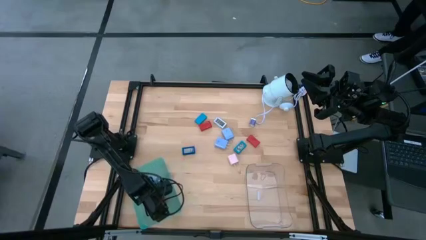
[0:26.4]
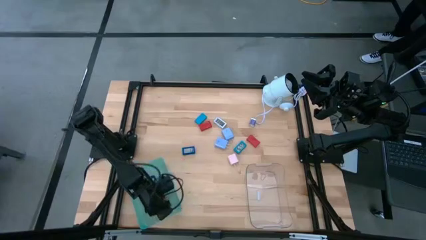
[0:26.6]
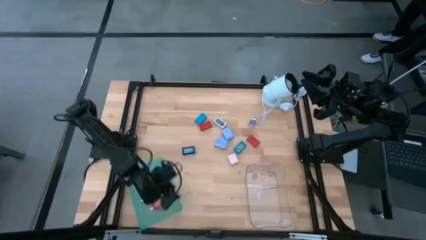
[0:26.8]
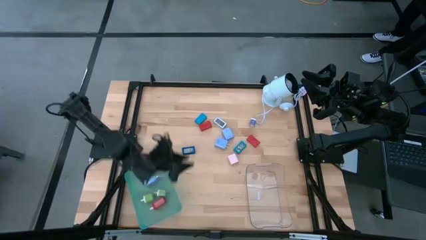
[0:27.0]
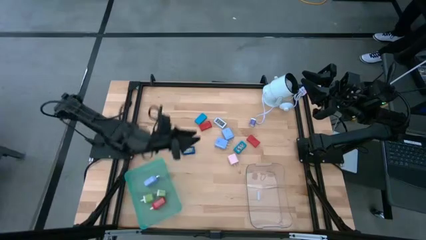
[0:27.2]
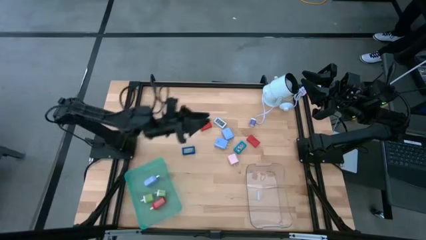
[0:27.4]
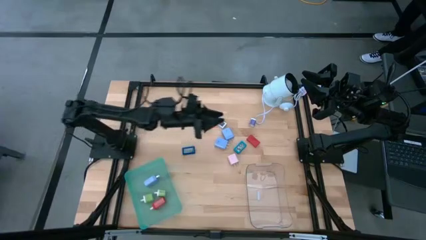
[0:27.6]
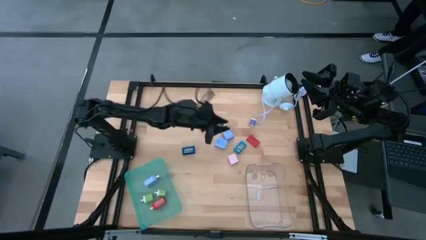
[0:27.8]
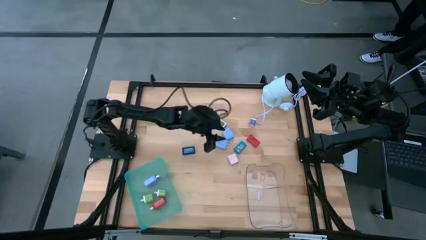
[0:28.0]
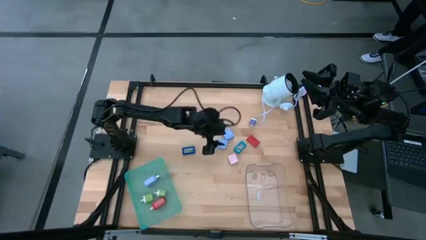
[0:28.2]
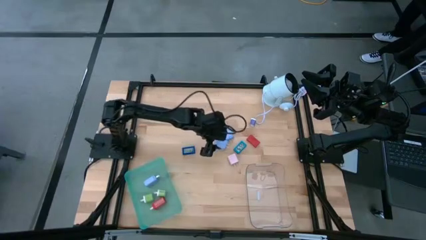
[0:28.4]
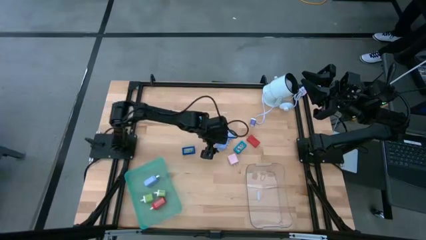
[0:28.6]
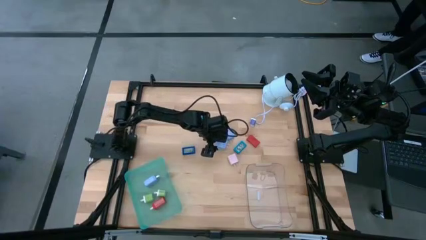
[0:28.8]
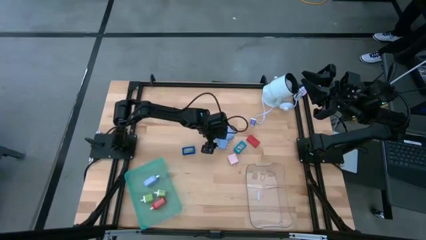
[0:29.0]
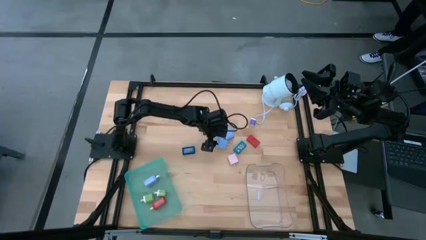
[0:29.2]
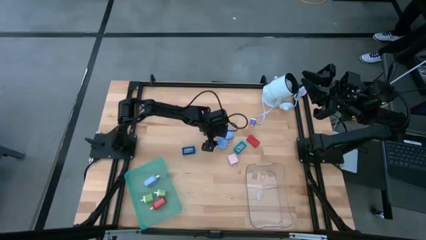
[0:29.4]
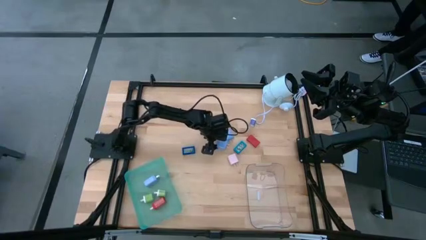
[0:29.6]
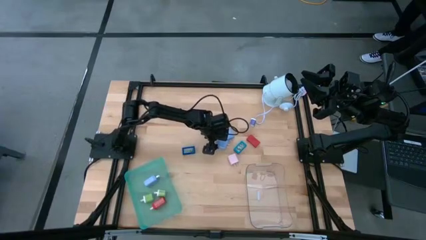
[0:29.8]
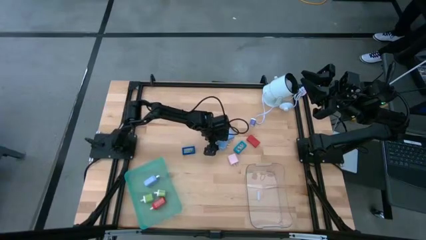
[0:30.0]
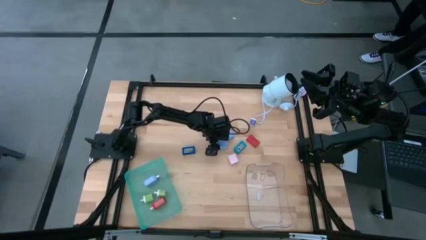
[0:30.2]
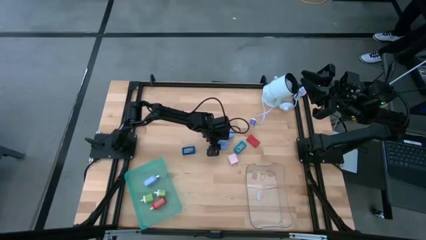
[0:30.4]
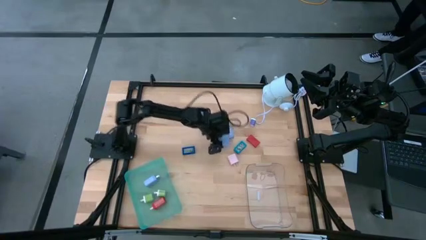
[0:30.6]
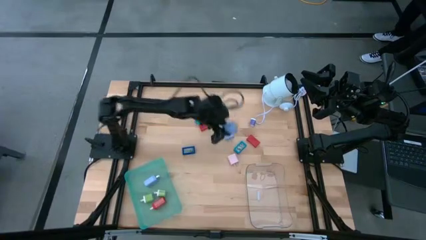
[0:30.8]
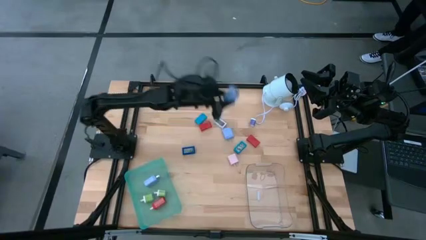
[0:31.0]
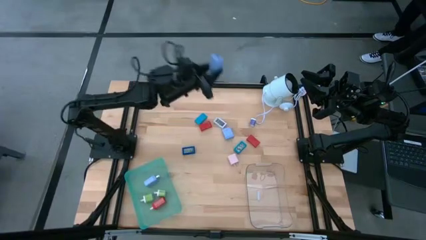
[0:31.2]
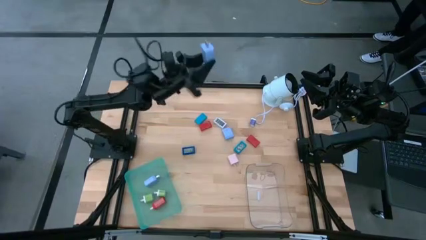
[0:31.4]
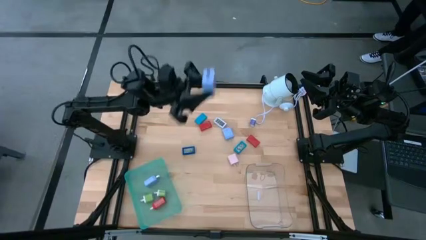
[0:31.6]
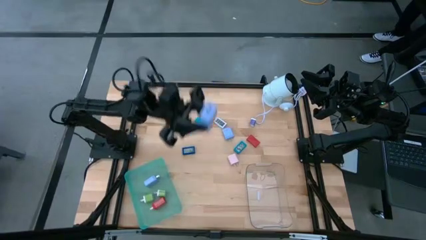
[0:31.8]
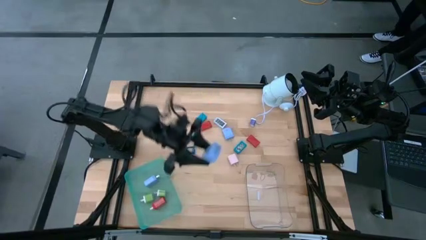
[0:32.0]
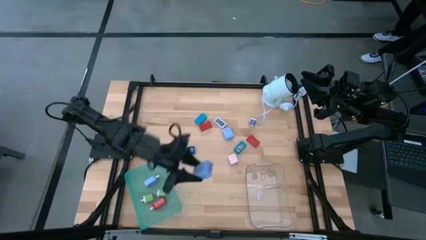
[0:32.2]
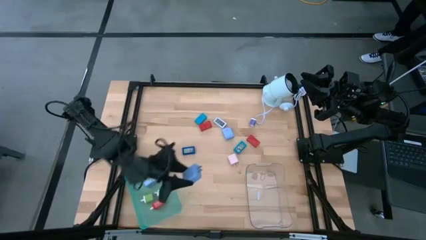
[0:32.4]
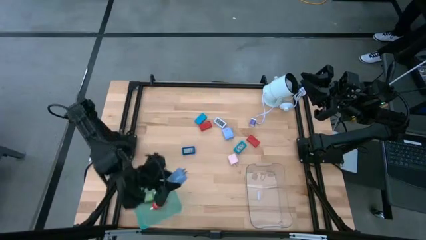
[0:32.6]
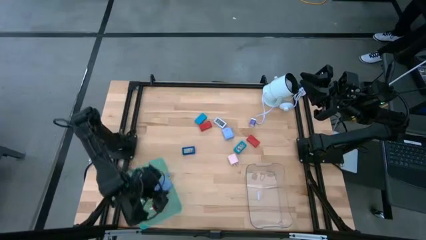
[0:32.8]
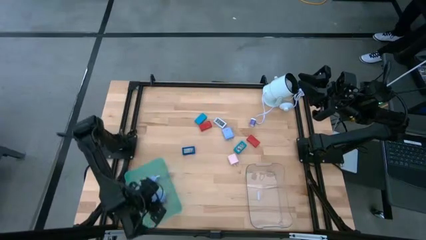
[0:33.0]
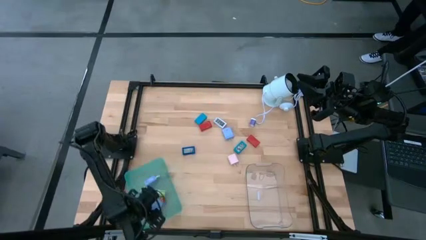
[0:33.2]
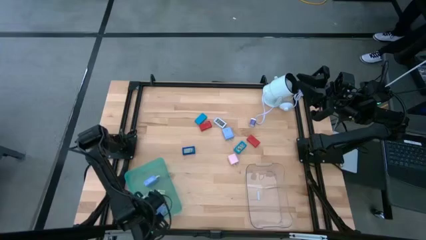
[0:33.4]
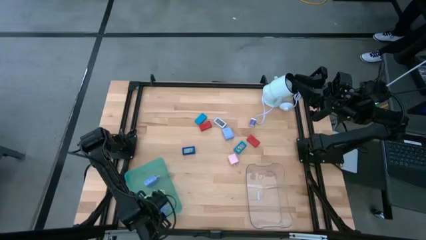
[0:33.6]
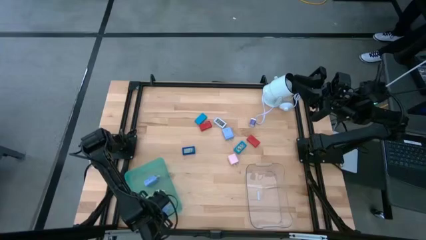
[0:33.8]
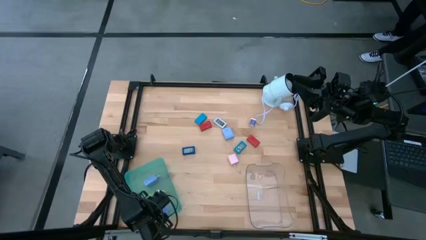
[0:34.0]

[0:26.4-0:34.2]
Task: Pick & Place Office items
Put the bottom blue charger adapter into the blue bin

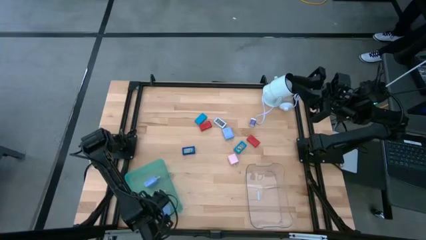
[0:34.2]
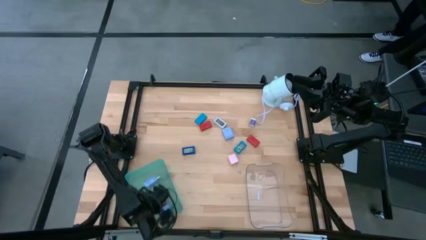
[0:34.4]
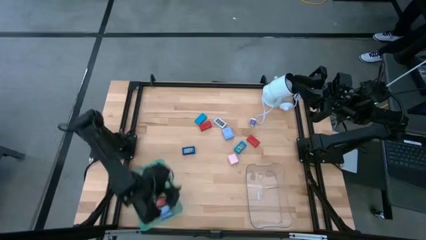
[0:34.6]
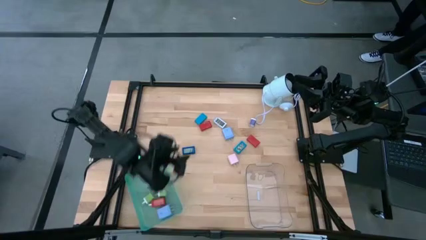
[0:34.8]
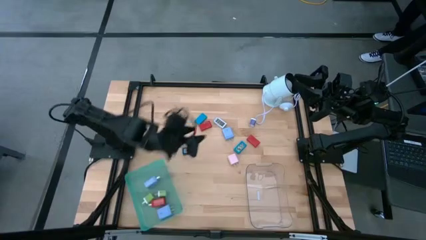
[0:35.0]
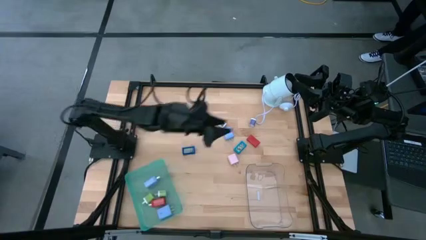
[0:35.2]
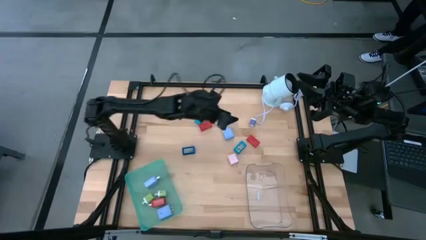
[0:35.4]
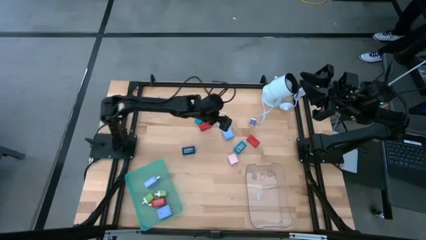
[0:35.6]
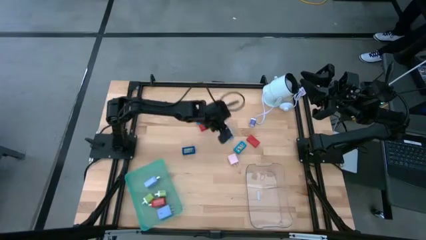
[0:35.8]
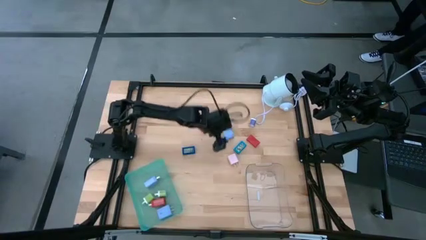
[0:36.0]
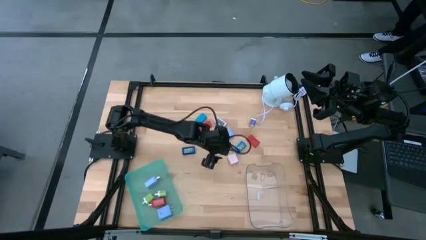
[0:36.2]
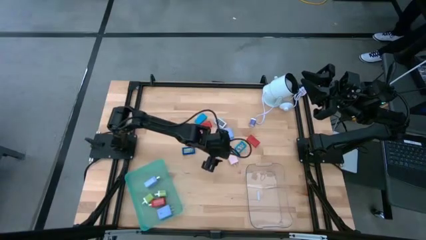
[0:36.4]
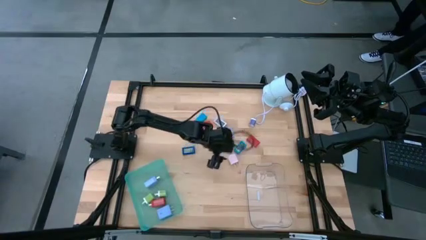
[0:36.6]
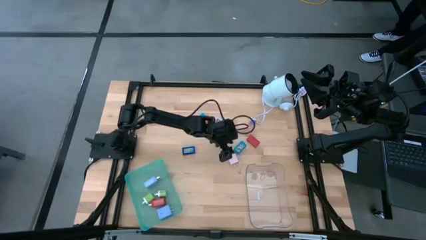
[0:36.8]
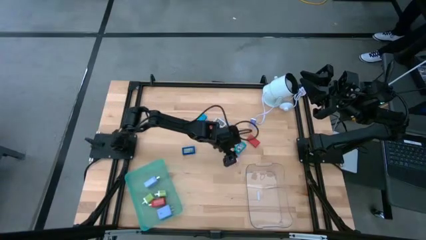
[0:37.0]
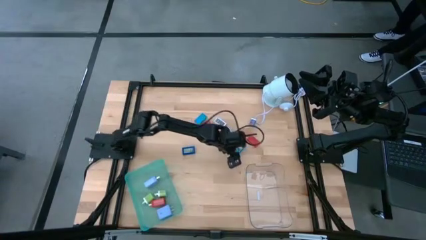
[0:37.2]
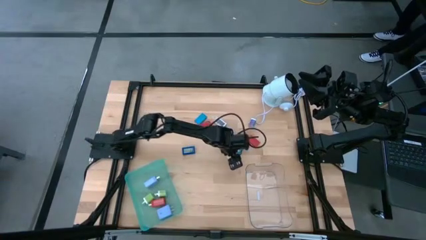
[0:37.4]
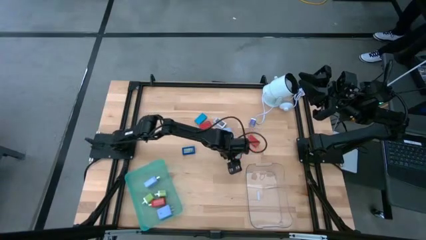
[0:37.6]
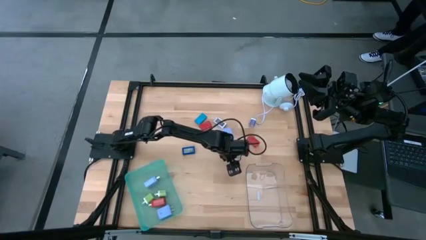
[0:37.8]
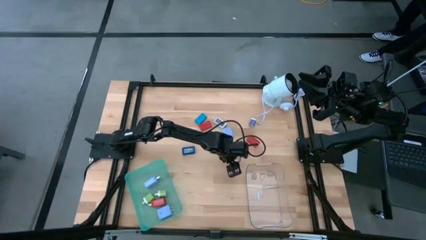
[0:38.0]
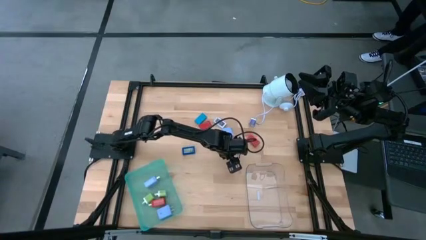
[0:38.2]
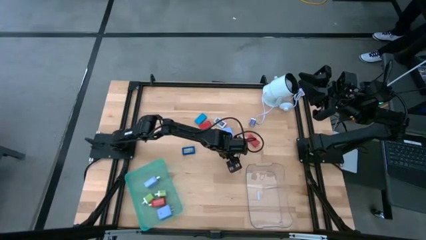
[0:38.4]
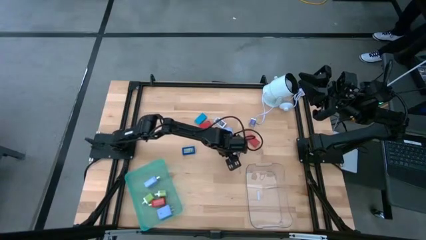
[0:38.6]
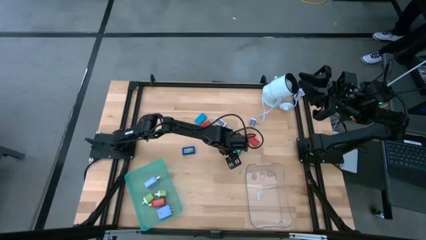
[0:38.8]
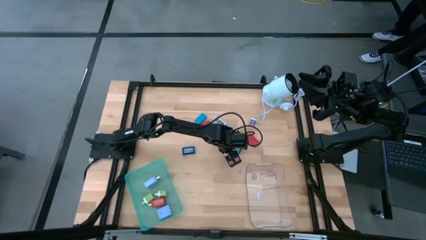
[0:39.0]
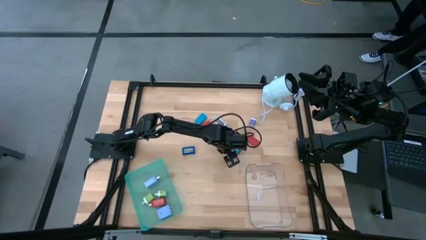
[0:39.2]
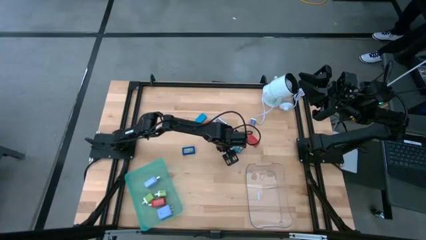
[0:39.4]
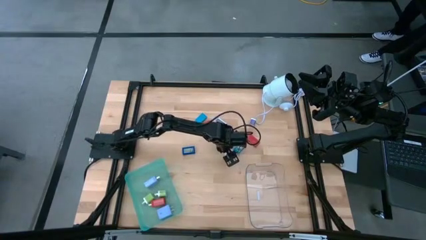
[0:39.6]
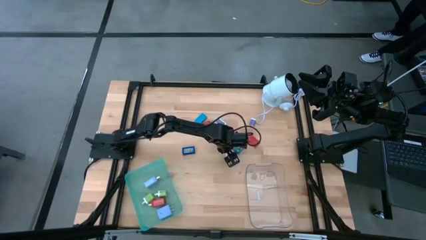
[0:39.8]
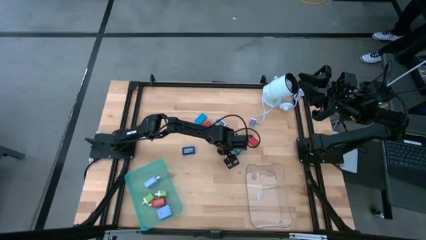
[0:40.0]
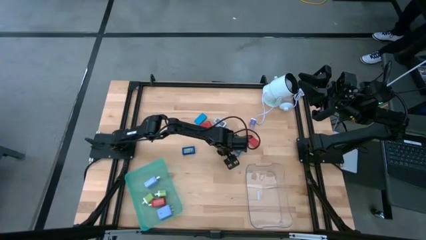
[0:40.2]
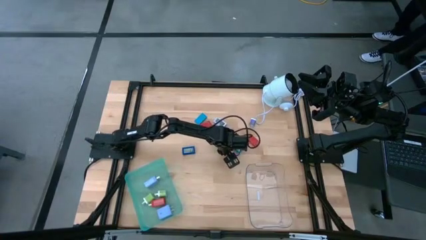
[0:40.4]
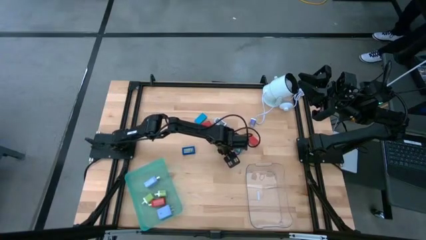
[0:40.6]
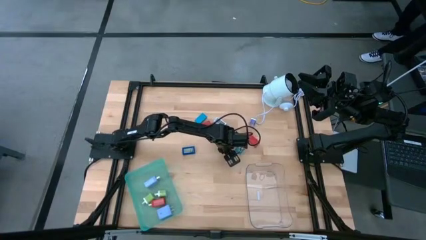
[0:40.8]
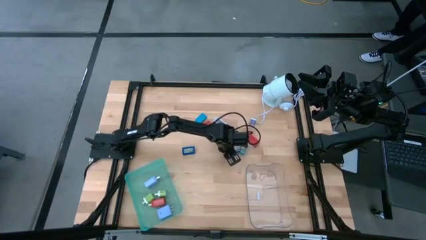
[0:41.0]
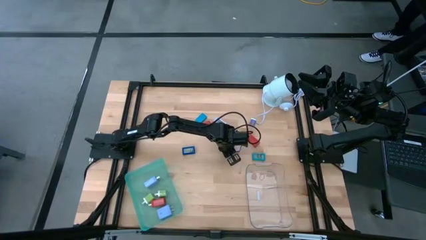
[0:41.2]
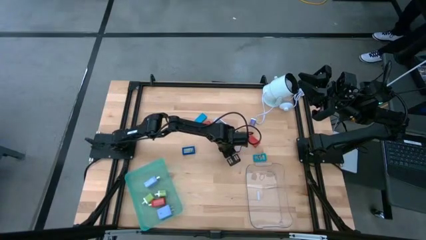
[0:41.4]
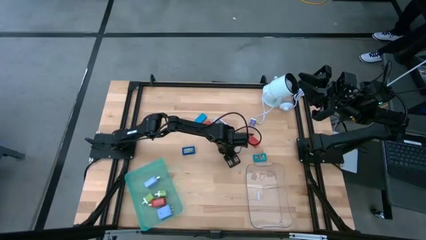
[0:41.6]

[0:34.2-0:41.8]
Put the pink charger adapter into the blue bin
